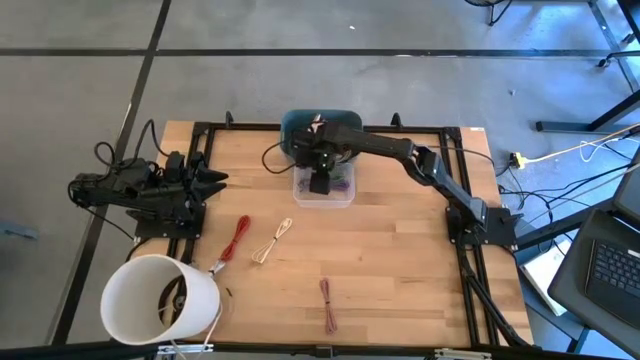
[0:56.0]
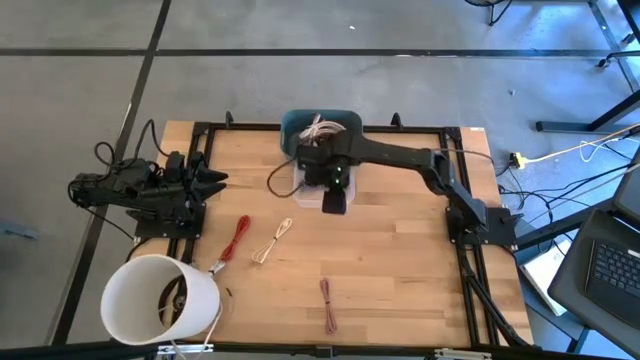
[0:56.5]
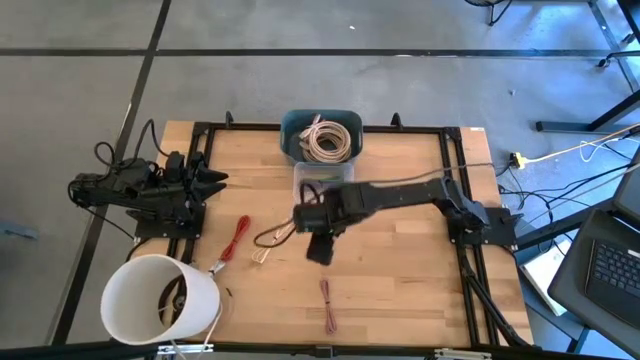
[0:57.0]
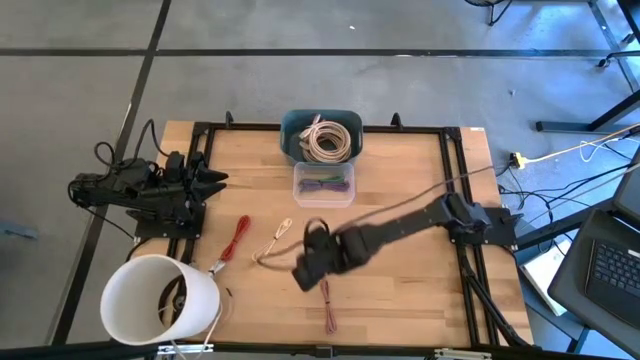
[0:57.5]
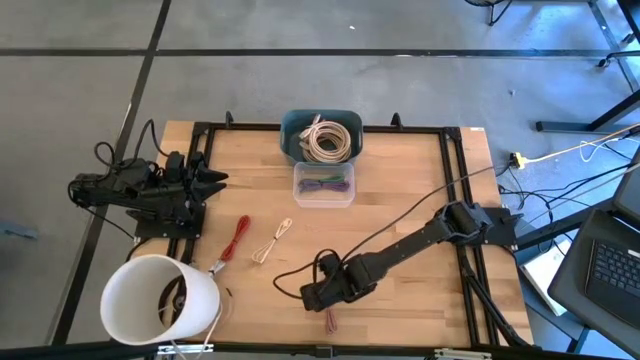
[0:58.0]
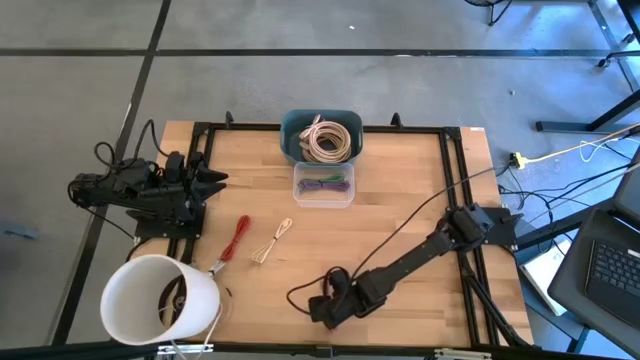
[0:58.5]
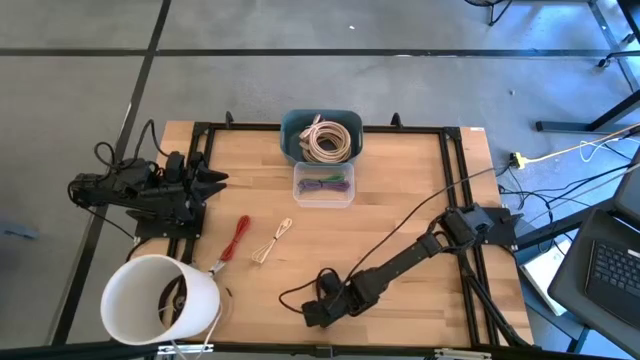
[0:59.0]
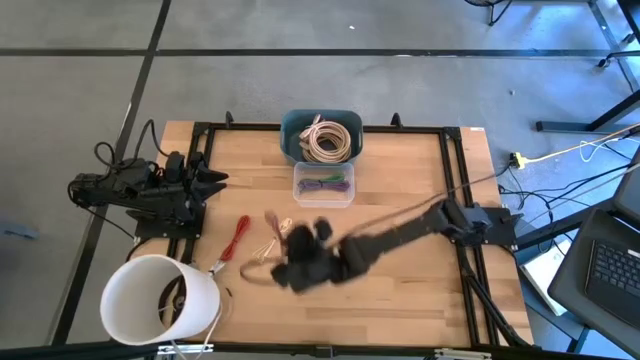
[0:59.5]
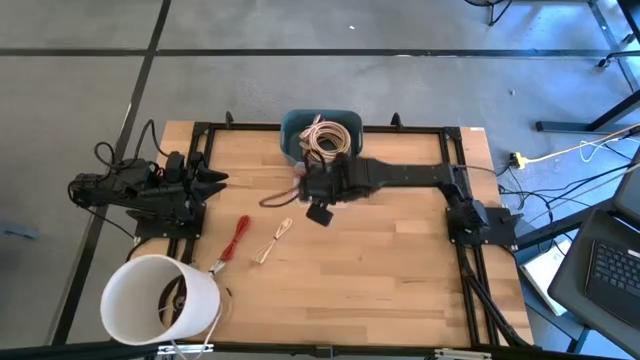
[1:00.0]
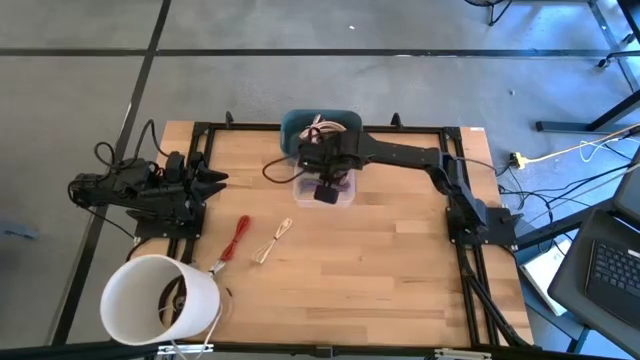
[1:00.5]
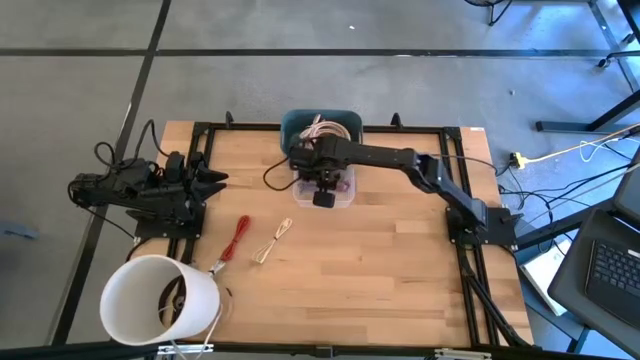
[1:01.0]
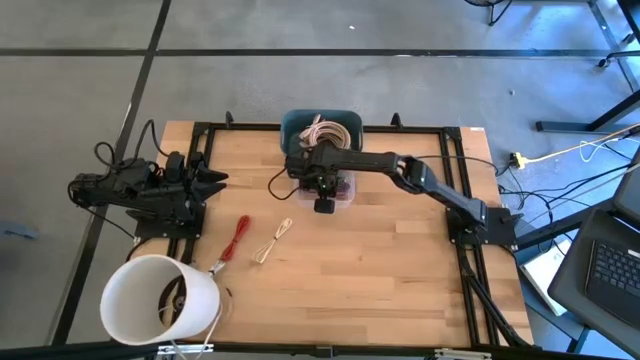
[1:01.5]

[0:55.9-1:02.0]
Put the pink charger cable into the transparent bin

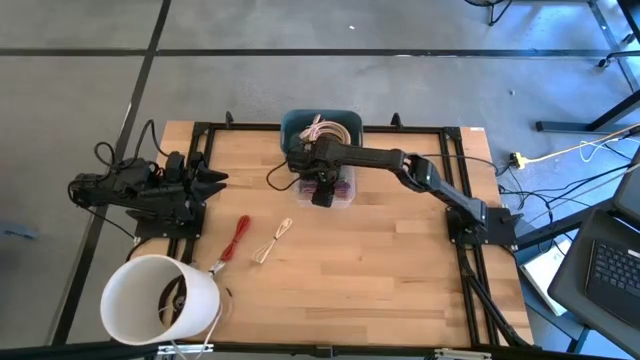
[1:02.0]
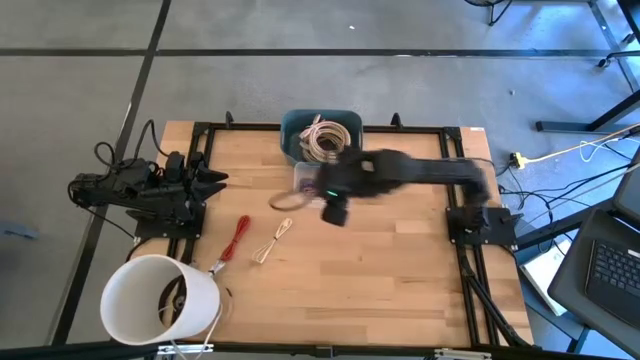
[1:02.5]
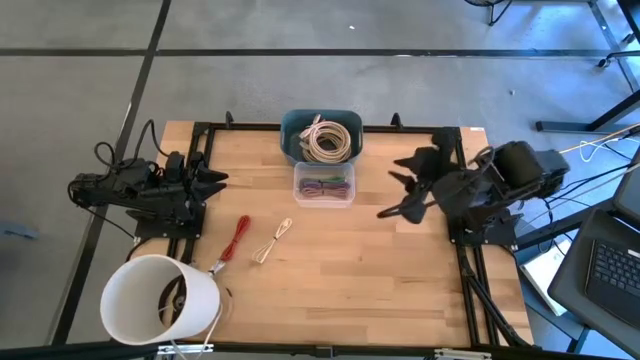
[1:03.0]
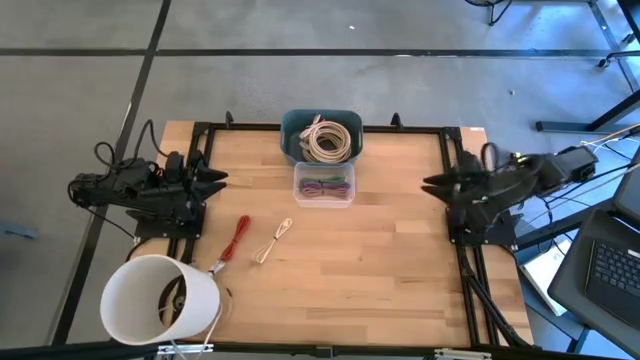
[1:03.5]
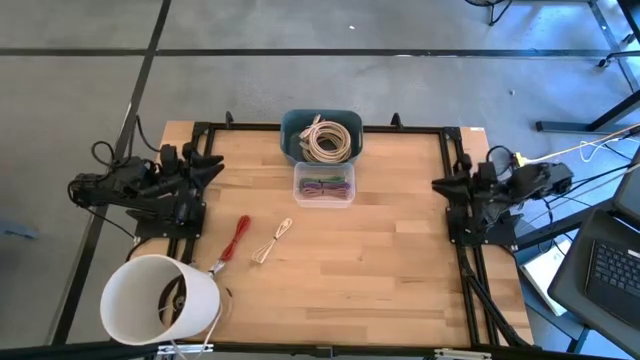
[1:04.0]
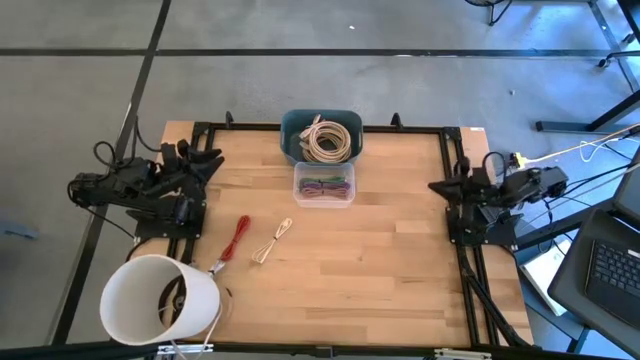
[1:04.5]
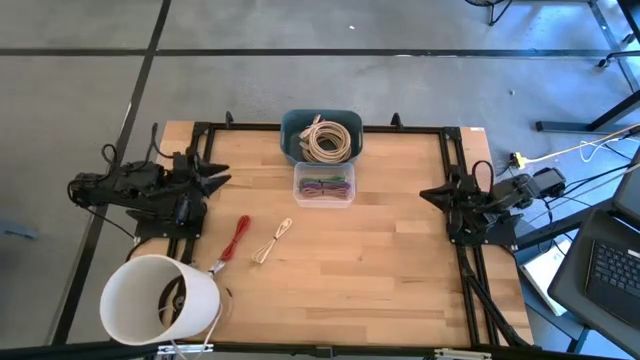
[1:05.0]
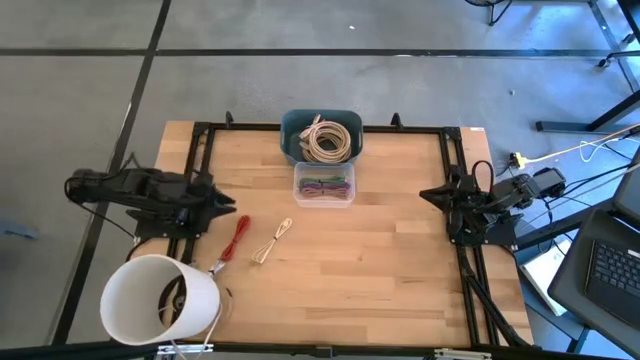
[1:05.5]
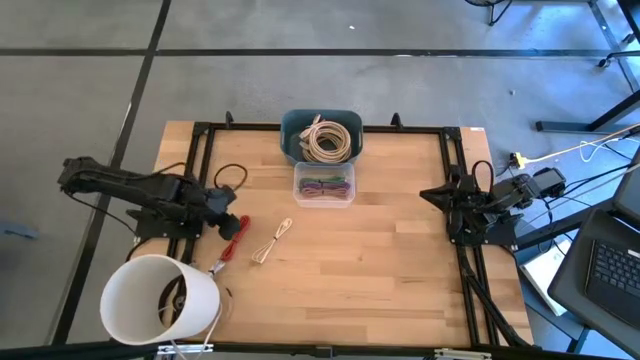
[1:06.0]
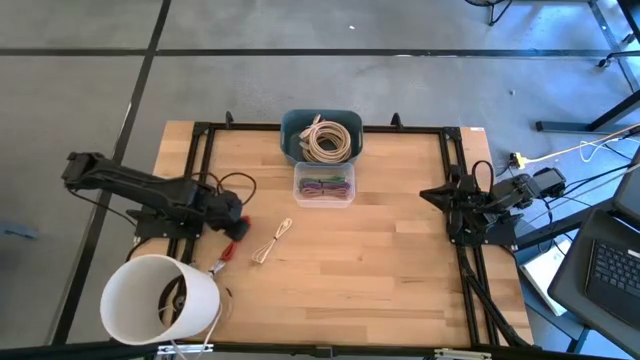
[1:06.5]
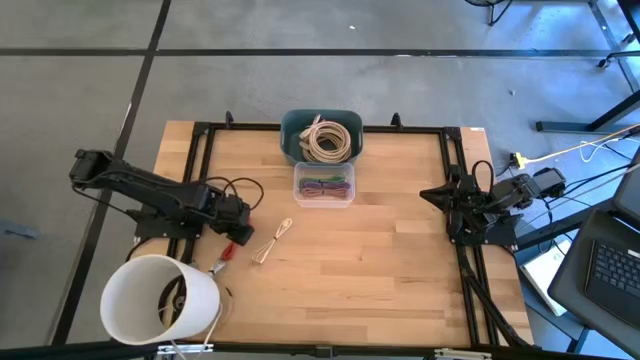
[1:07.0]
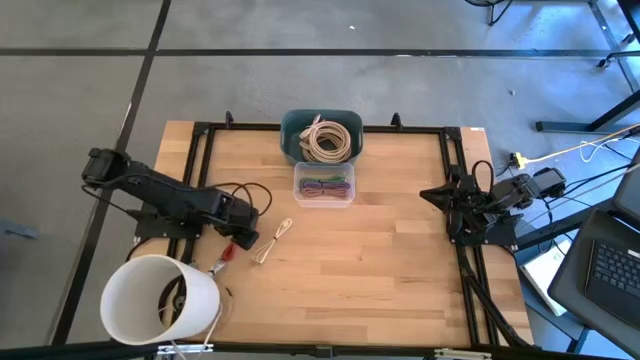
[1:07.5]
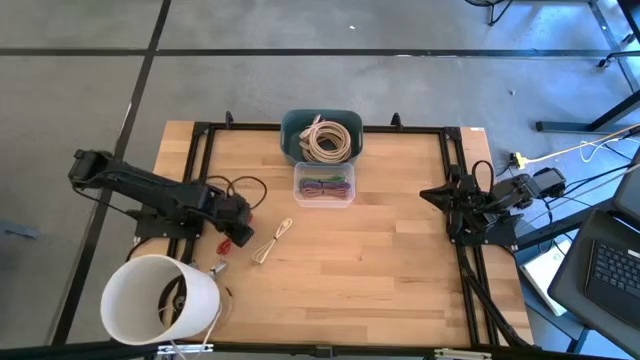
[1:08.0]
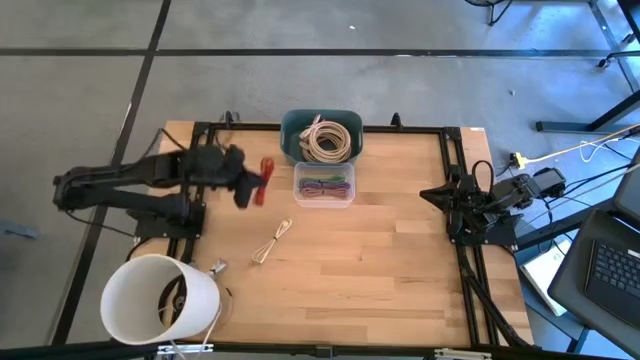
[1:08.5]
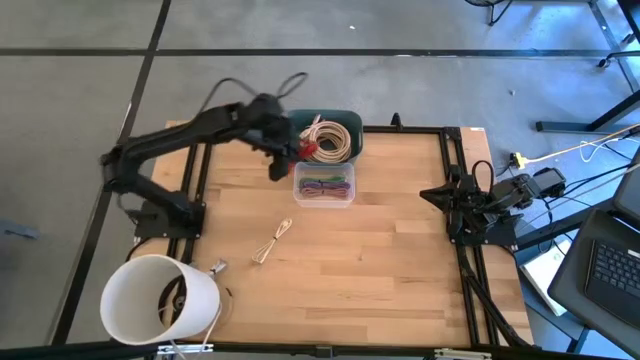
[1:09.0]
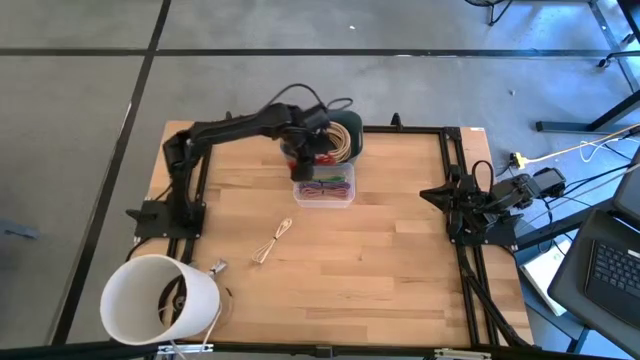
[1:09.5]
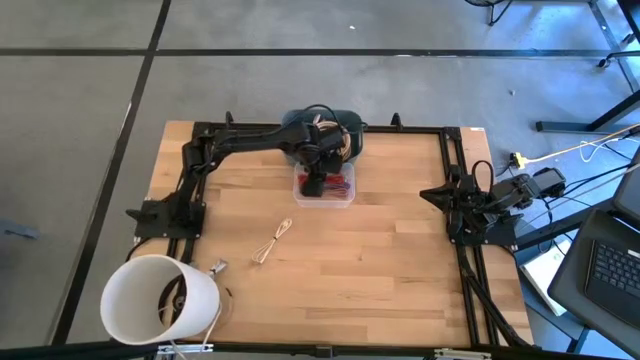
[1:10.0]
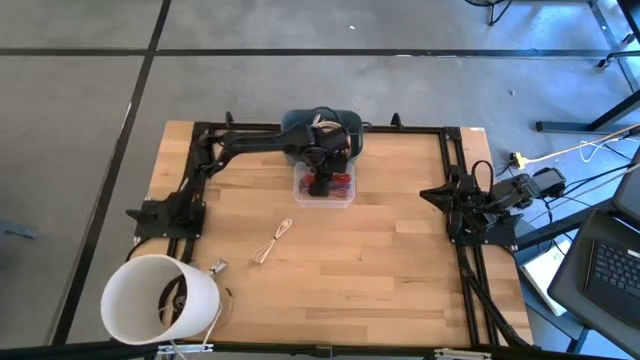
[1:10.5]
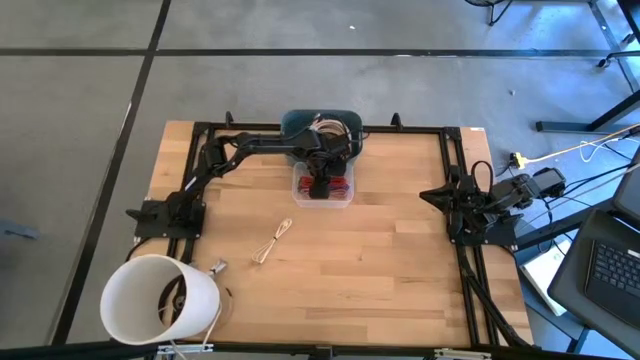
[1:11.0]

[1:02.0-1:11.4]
Put the red charger cable into the transparent bin

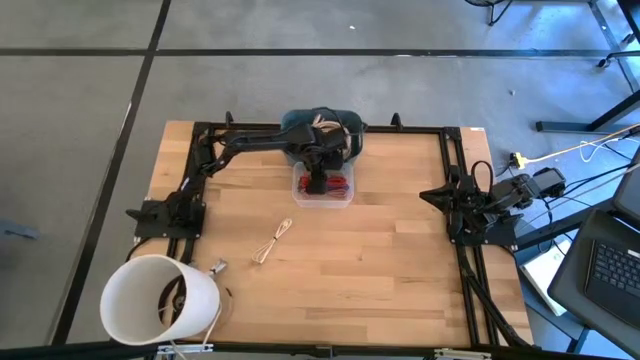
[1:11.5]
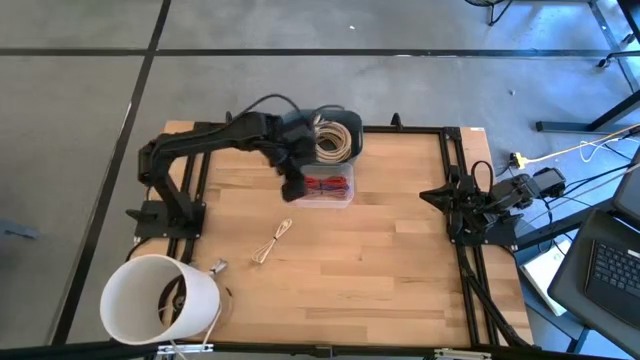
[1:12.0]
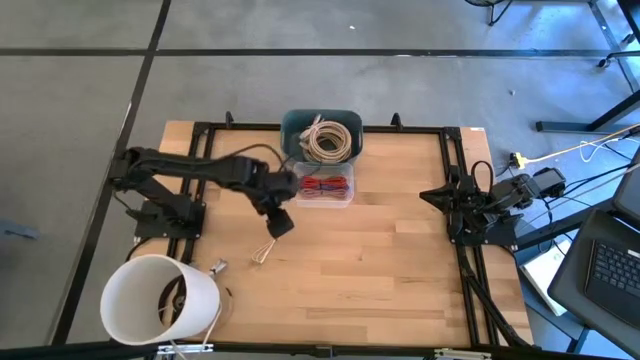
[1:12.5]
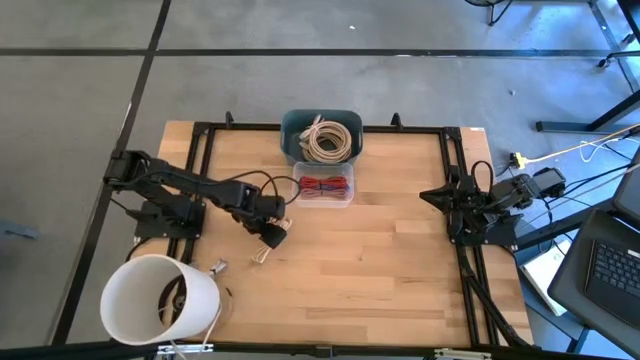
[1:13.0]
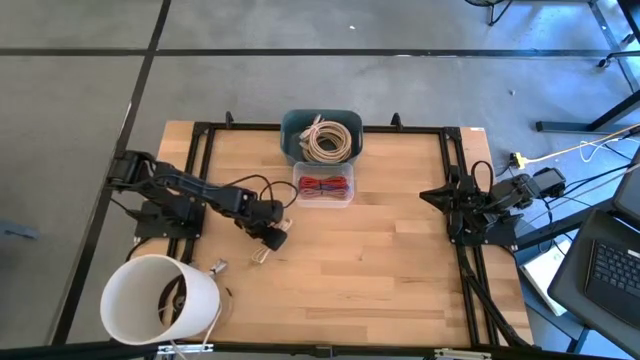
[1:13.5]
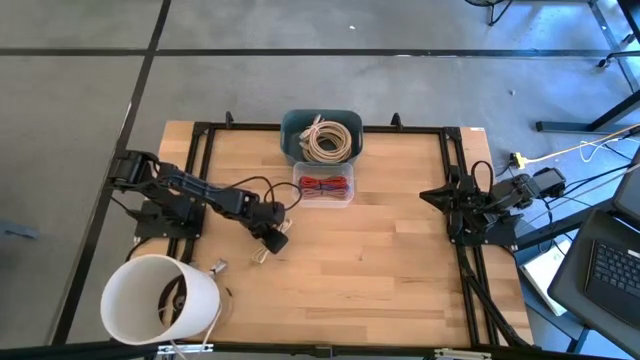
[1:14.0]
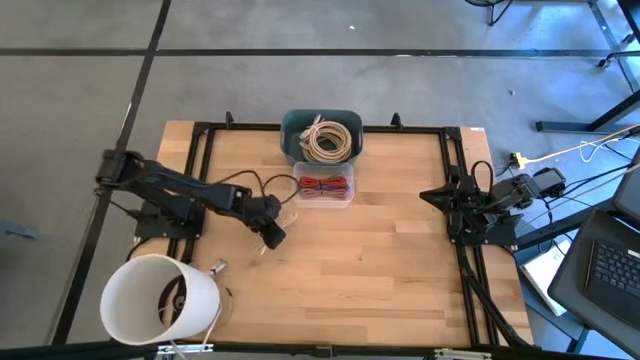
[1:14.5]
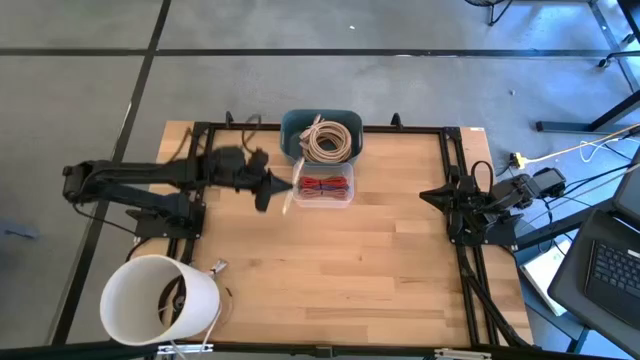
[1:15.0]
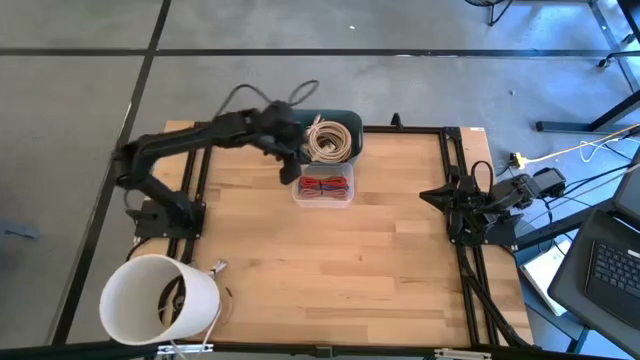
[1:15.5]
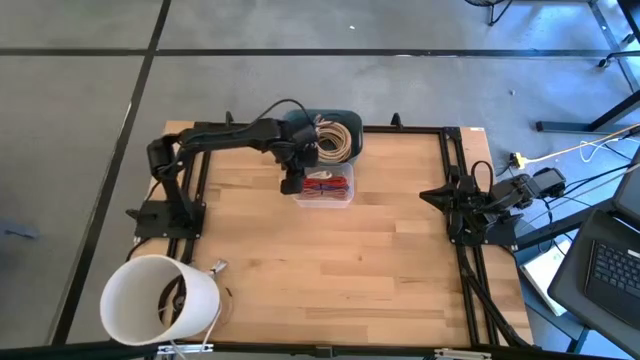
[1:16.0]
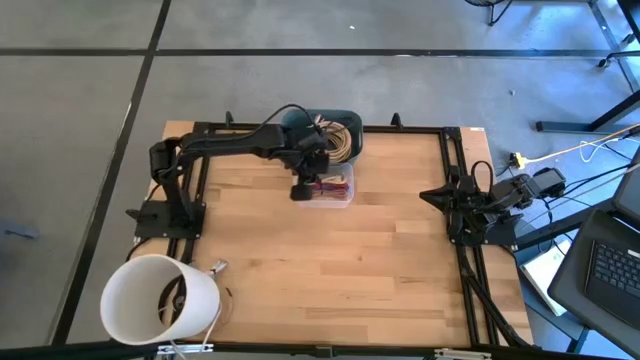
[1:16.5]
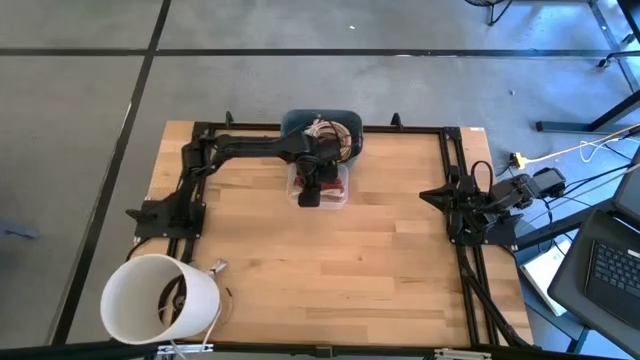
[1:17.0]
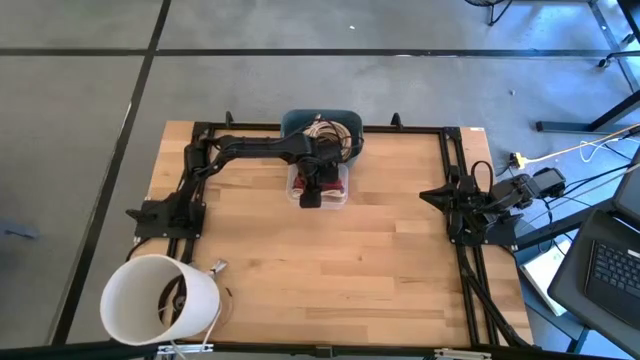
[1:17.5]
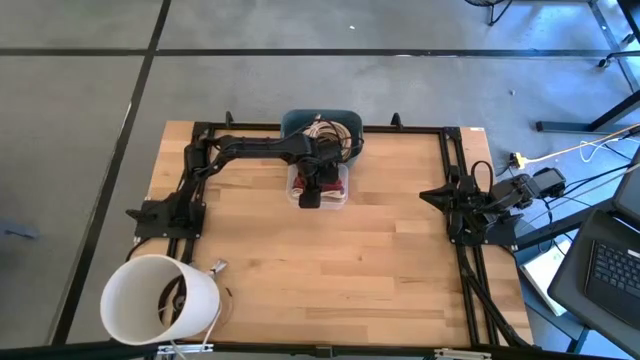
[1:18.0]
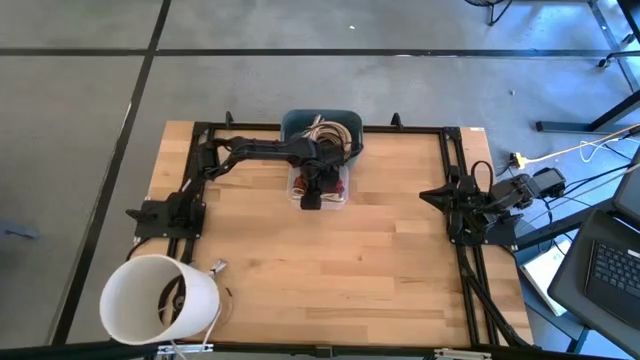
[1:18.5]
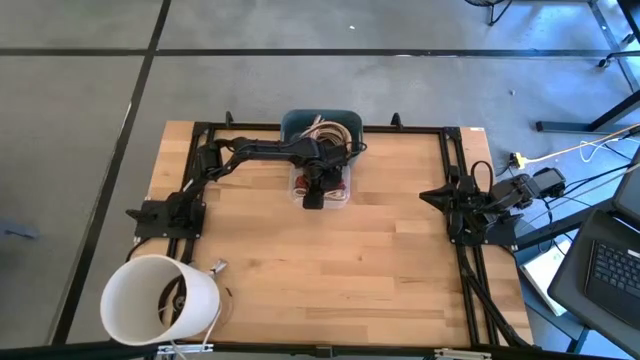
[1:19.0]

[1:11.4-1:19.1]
Put the white charger cable into the transparent bin
